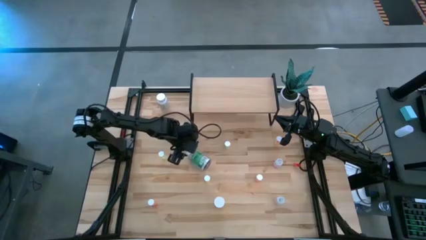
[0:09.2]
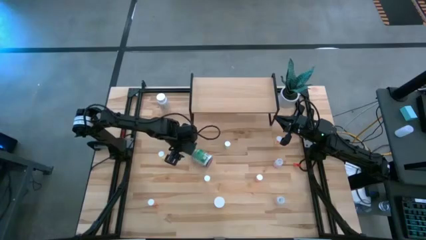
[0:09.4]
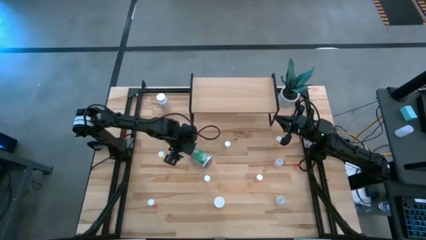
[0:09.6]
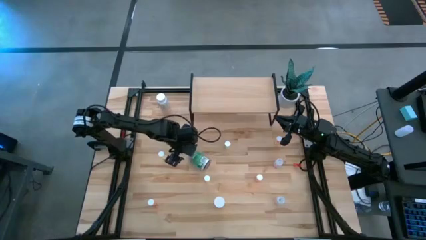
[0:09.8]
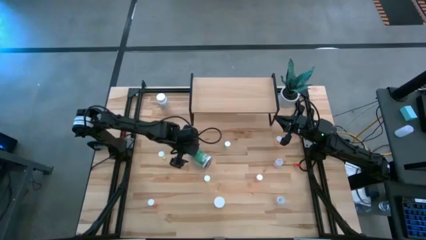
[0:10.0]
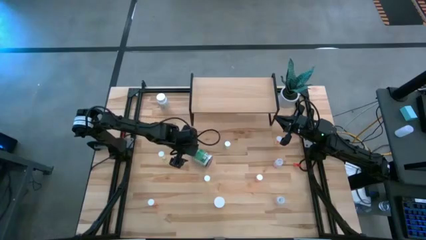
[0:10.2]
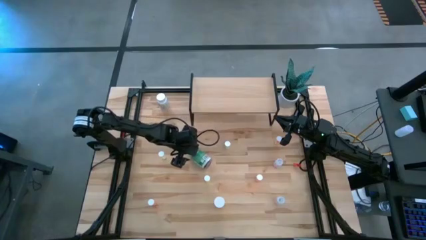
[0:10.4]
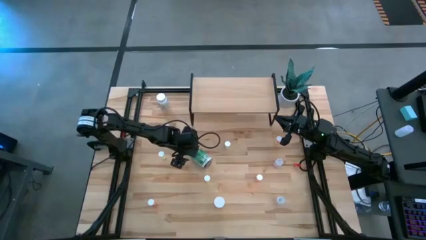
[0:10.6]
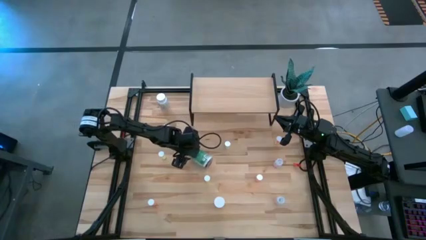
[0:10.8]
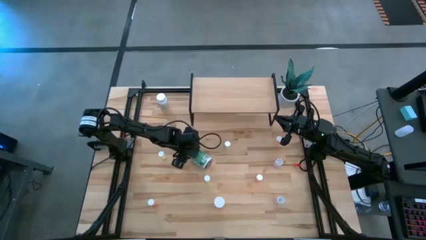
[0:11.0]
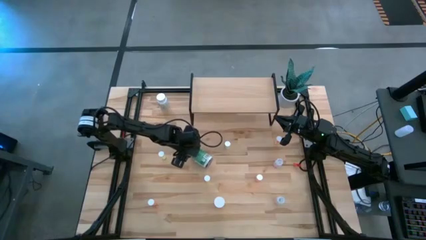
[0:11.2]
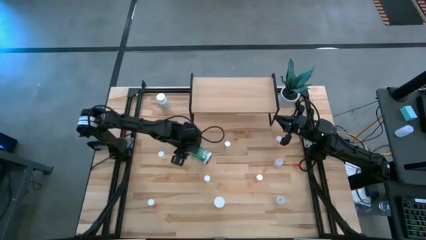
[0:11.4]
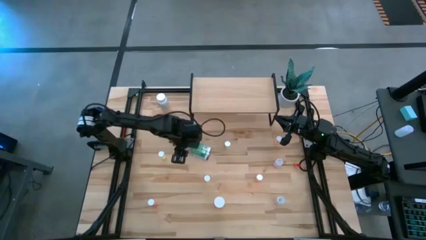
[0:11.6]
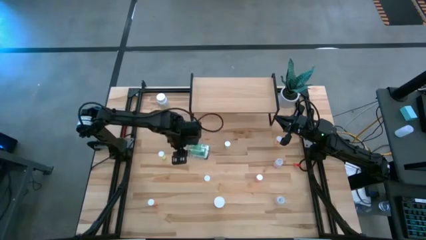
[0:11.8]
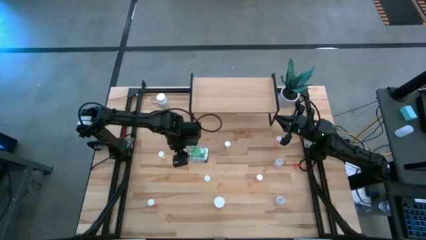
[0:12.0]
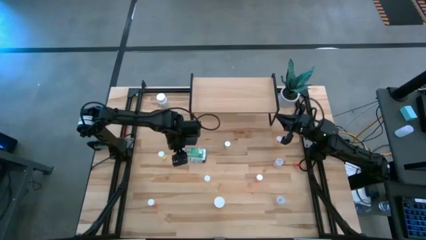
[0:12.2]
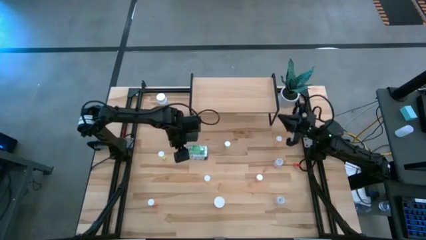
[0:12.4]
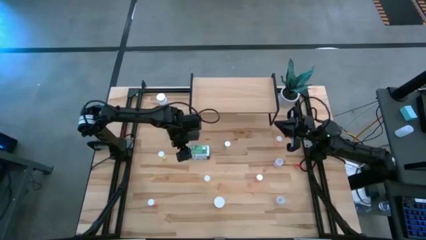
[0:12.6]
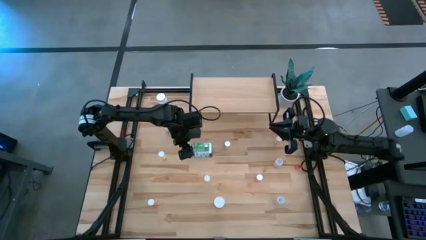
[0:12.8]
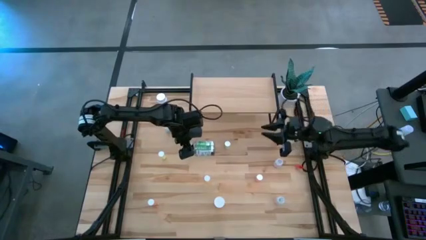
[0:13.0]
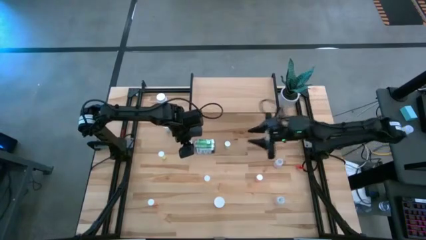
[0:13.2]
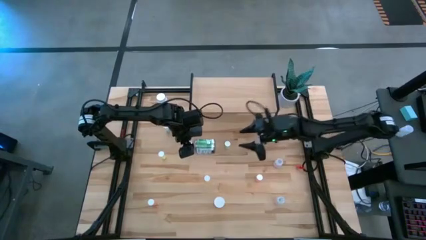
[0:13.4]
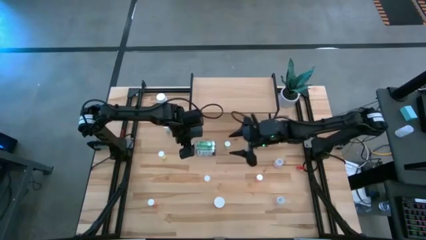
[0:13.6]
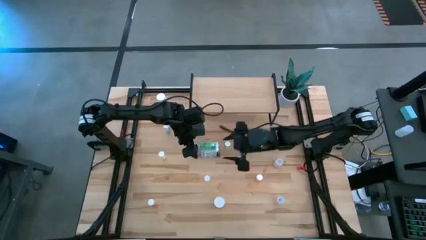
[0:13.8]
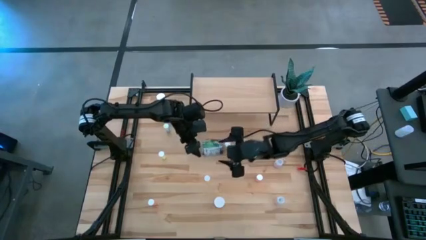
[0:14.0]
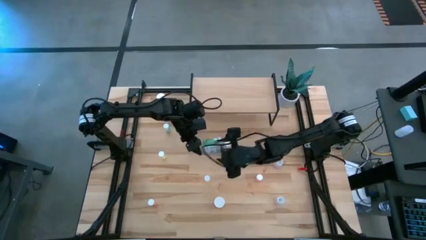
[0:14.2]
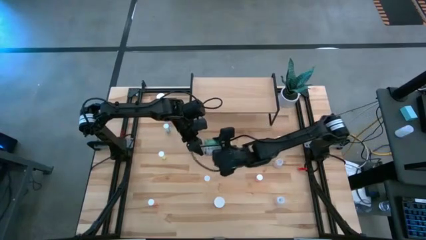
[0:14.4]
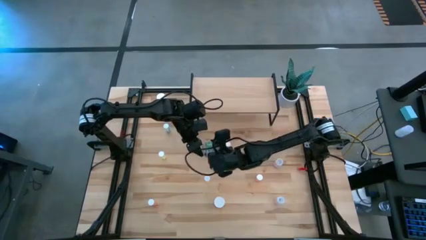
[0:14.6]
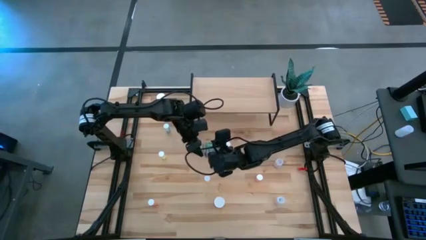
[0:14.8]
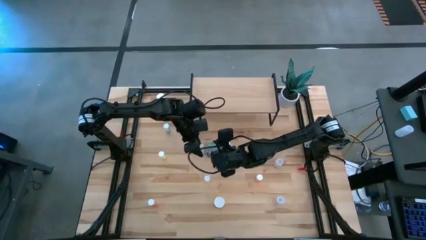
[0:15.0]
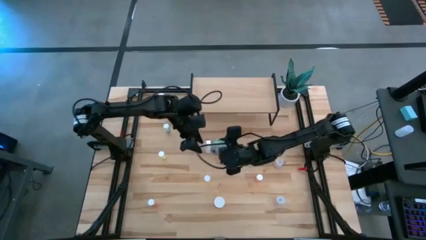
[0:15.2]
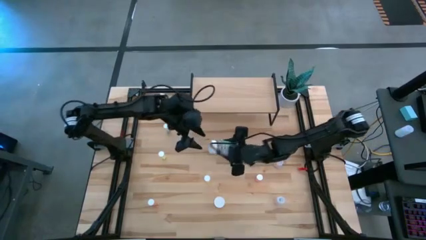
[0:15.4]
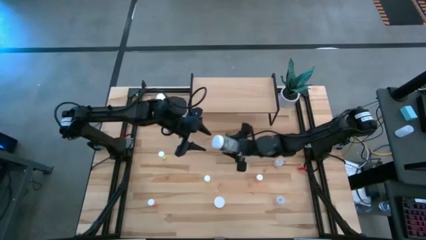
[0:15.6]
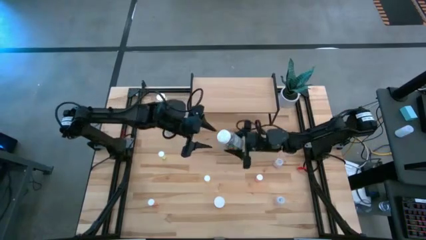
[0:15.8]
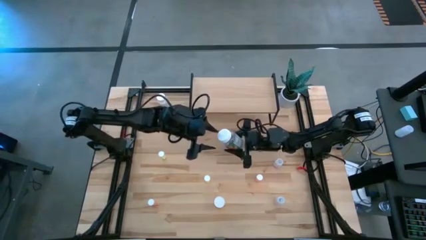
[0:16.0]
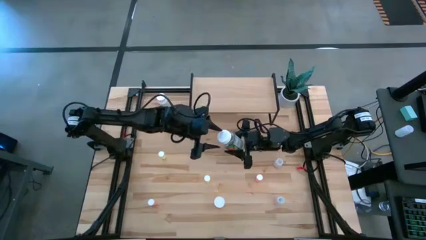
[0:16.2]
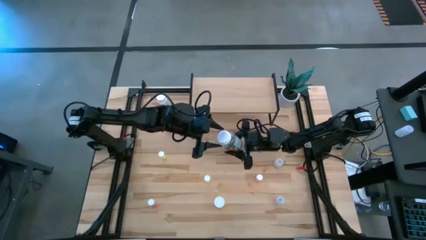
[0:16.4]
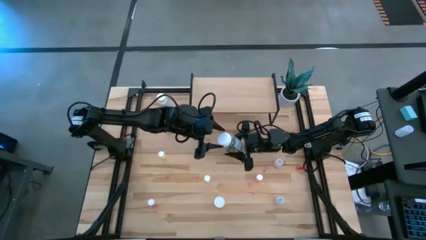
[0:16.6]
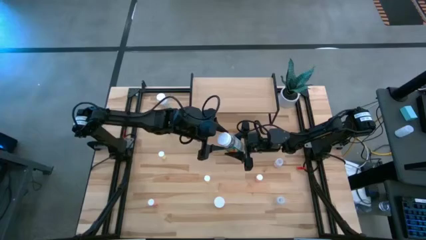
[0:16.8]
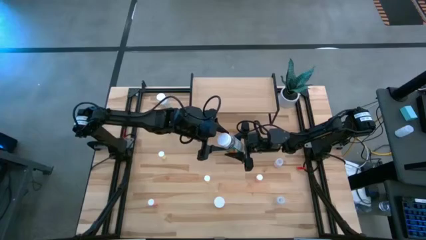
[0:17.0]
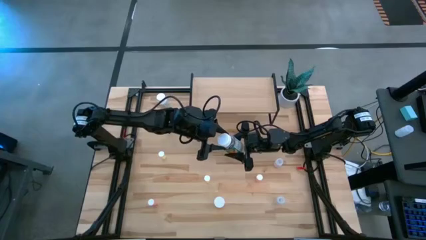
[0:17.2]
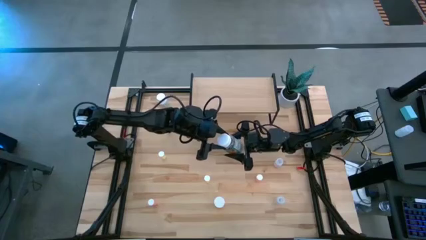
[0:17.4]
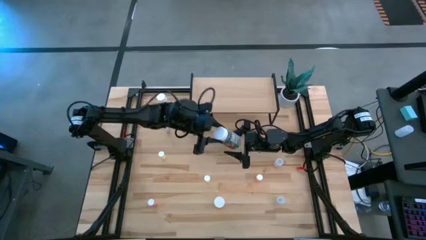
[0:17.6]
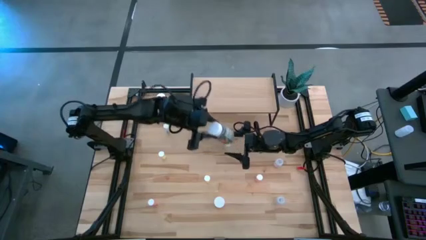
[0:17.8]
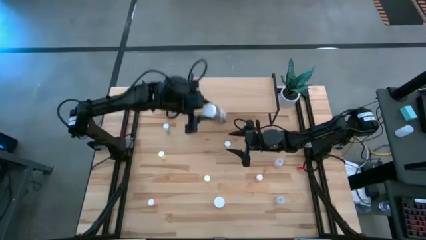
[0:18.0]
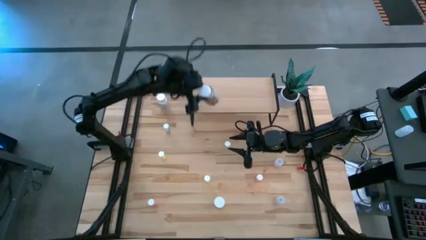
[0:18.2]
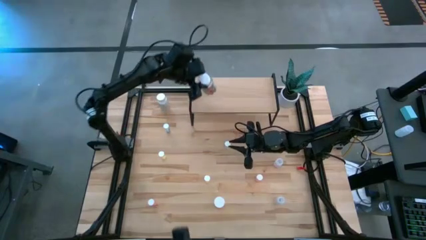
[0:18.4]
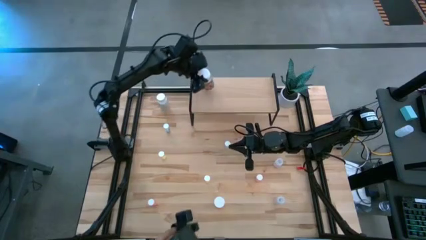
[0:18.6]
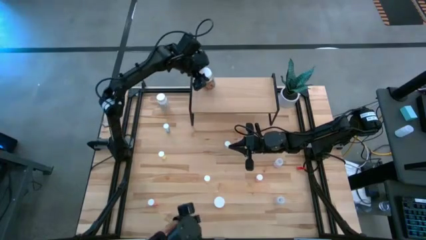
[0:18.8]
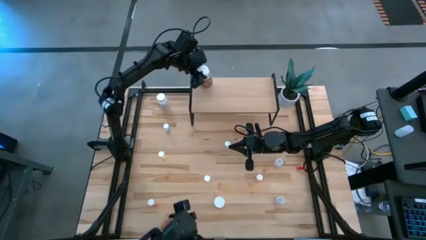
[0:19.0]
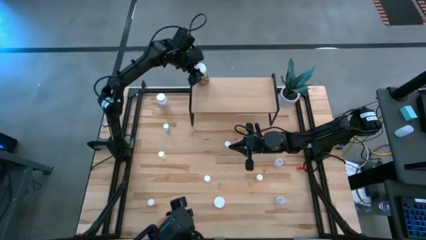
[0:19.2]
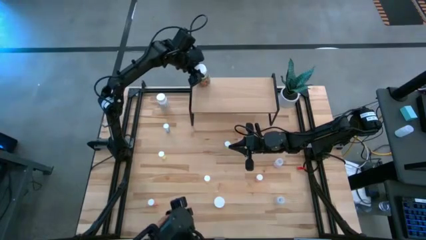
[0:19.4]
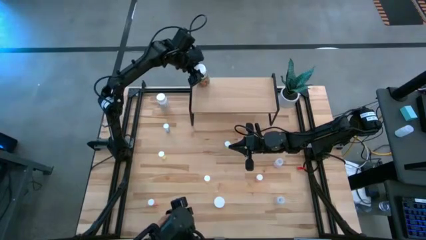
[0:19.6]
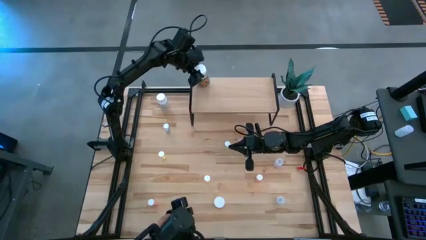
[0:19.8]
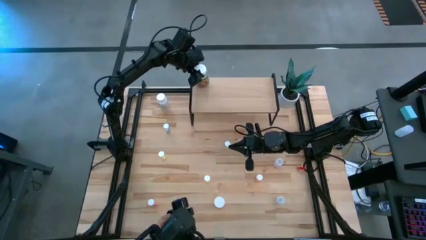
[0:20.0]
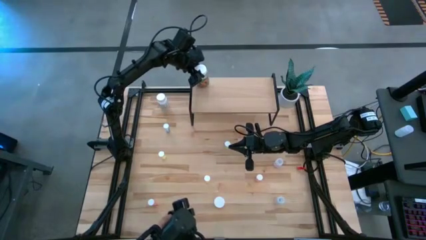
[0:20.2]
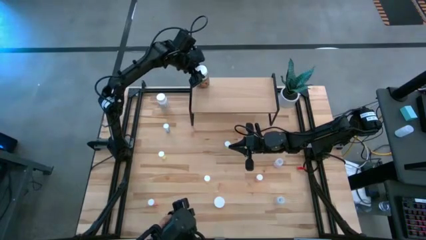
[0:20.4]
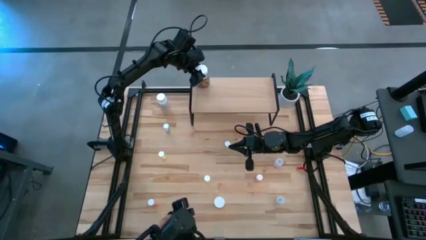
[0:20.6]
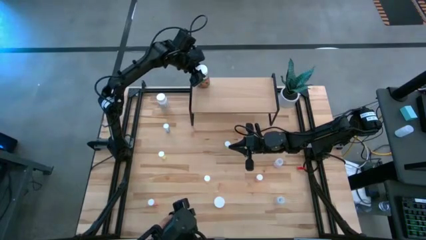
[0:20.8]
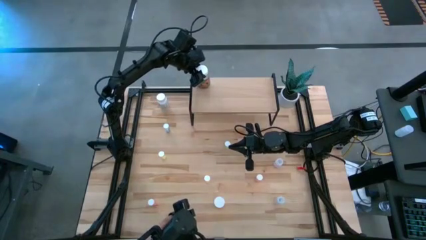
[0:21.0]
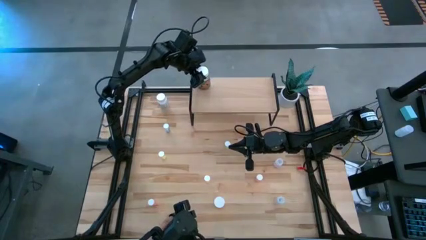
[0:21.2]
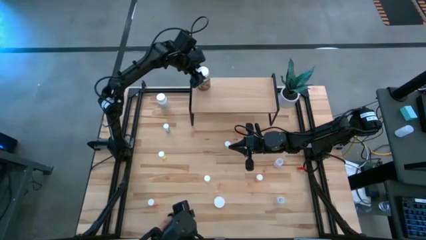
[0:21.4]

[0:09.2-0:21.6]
Task: Pick and place medicine bottles onto shelf by color
Put the green pill bottle on the shelf

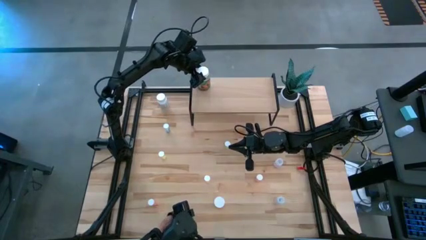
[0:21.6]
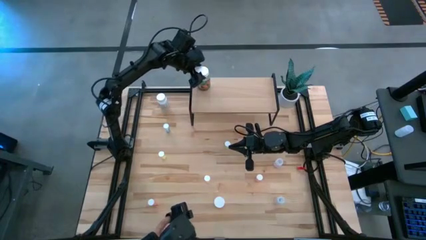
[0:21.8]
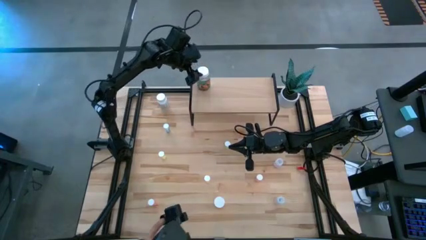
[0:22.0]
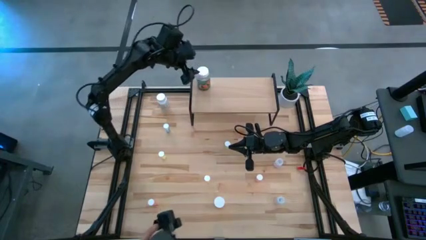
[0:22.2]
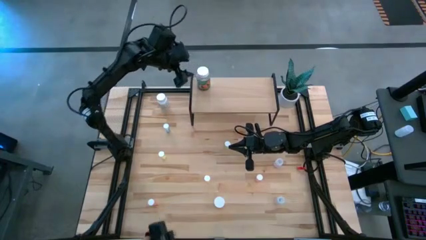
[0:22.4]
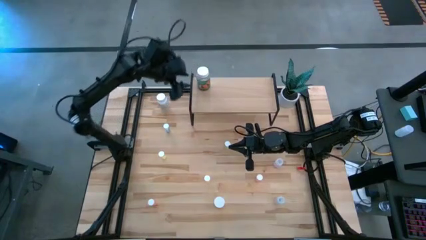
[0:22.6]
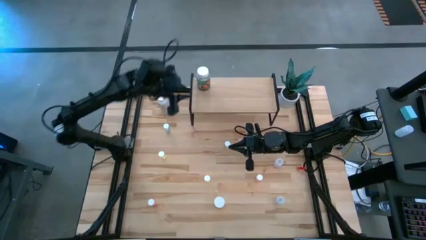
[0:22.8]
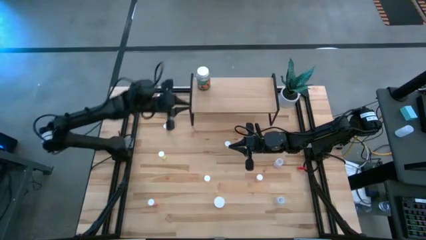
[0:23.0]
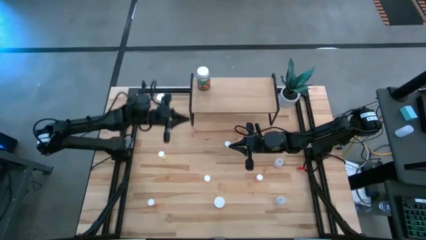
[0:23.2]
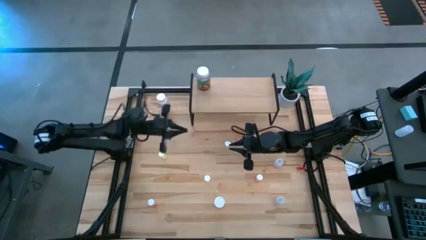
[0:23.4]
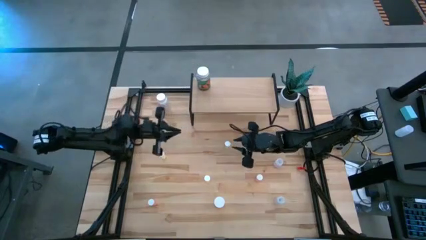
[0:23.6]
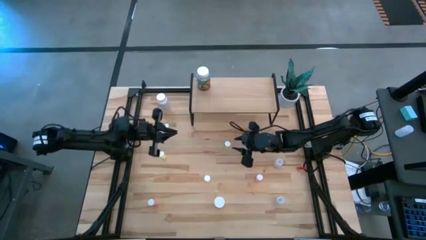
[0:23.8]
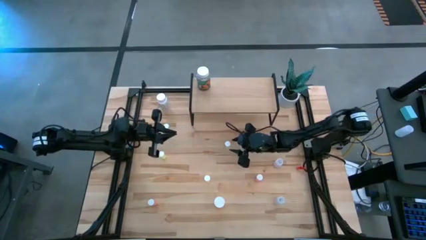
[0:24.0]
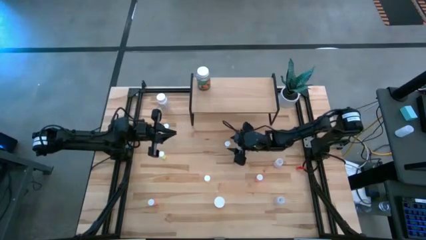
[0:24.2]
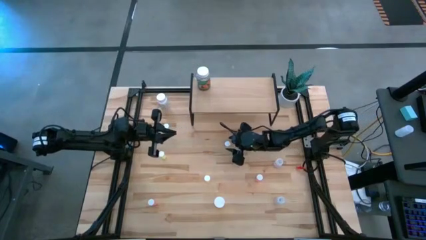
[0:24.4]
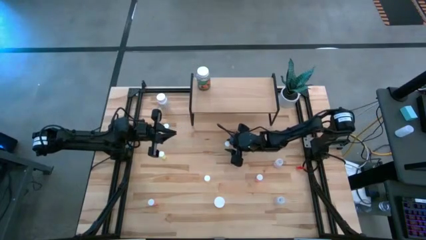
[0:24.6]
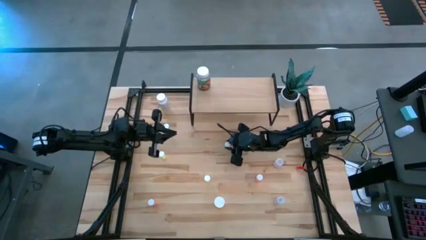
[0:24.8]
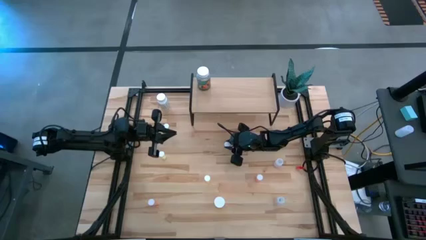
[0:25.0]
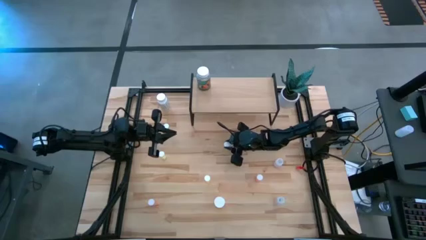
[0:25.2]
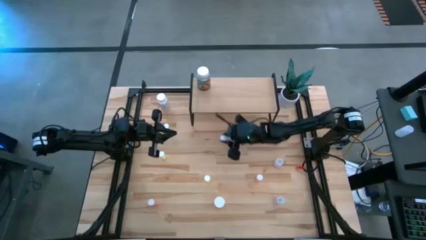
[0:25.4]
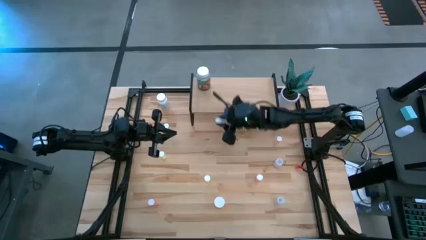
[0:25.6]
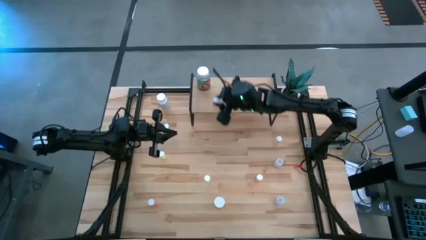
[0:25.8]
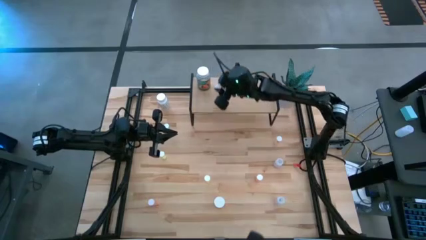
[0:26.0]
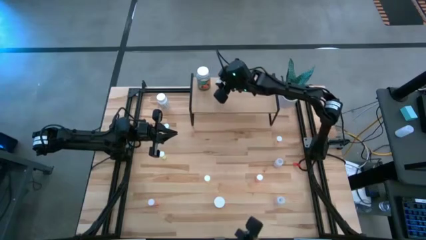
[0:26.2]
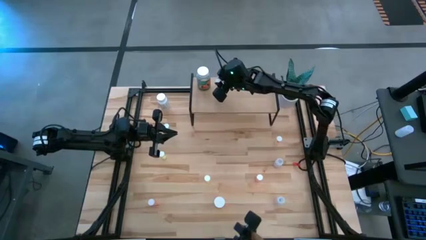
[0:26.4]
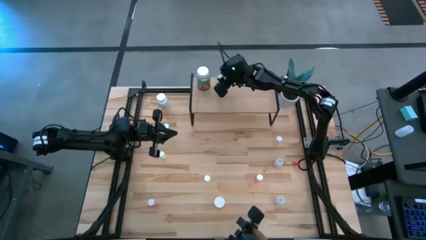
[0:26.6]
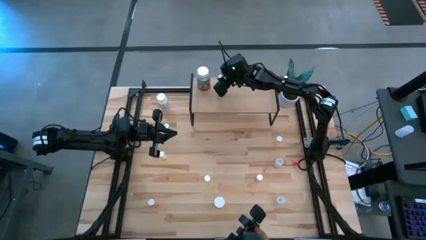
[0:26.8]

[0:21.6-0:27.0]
Put the top right yellow pill bottle on the shelf
